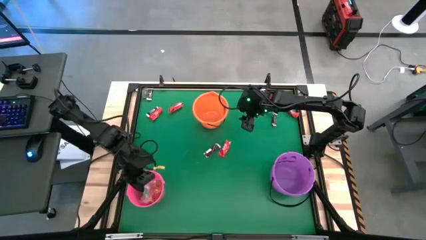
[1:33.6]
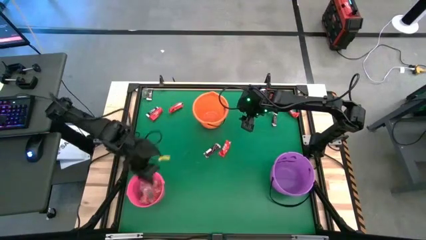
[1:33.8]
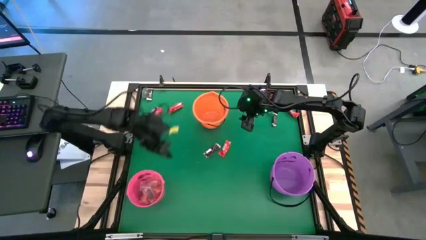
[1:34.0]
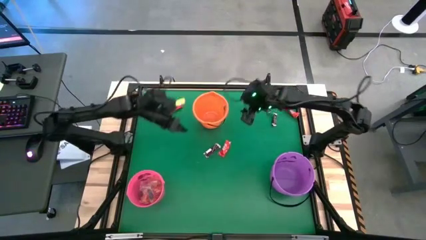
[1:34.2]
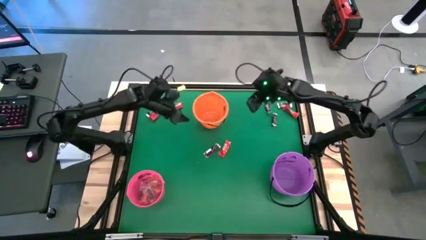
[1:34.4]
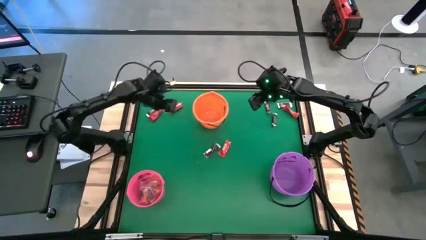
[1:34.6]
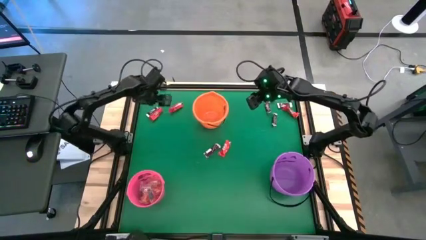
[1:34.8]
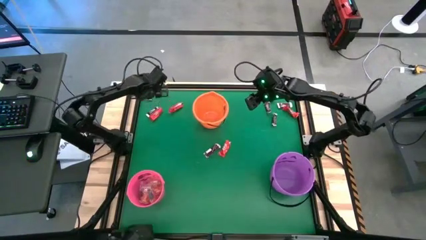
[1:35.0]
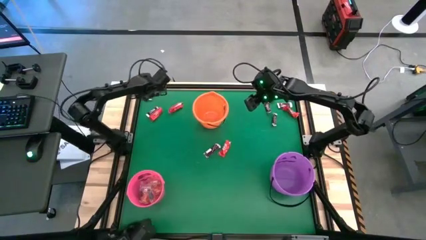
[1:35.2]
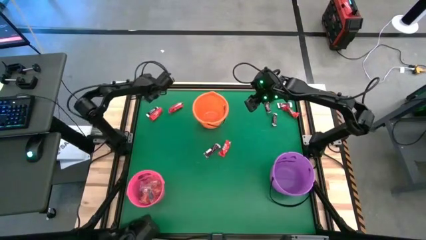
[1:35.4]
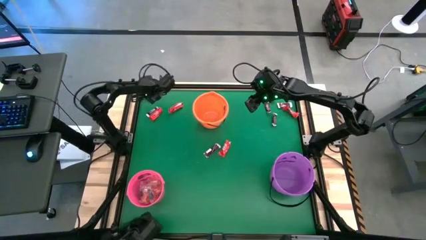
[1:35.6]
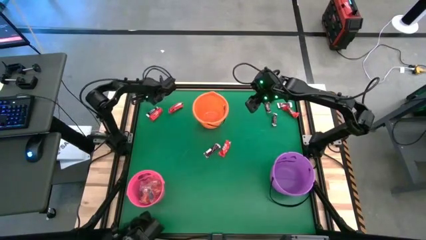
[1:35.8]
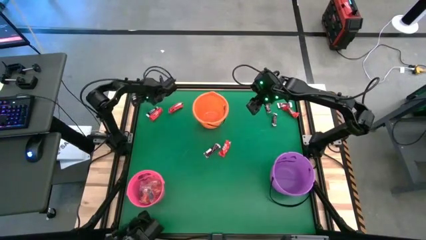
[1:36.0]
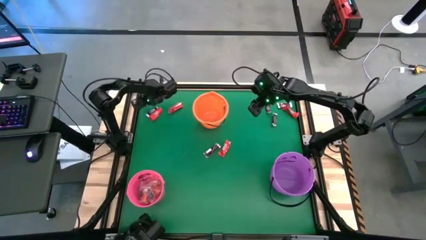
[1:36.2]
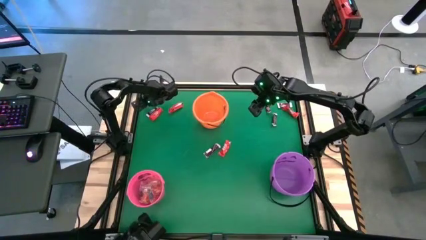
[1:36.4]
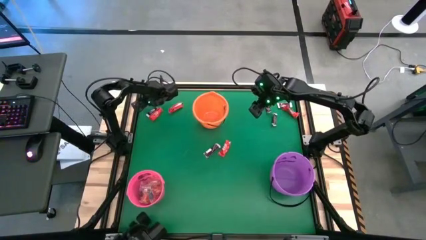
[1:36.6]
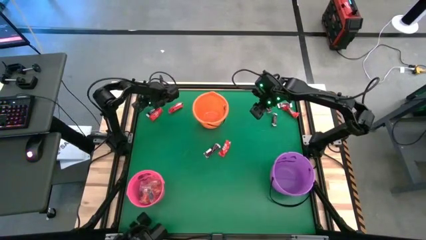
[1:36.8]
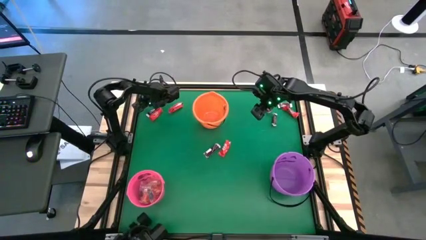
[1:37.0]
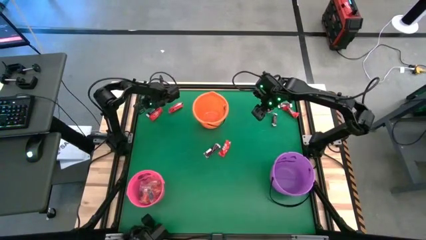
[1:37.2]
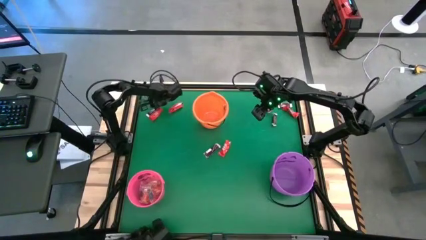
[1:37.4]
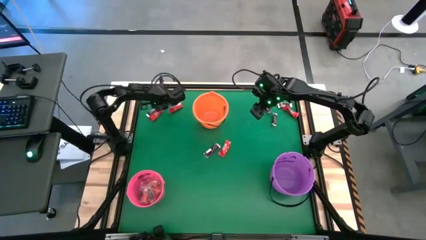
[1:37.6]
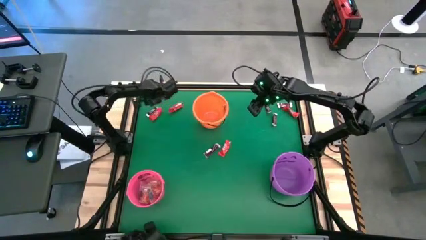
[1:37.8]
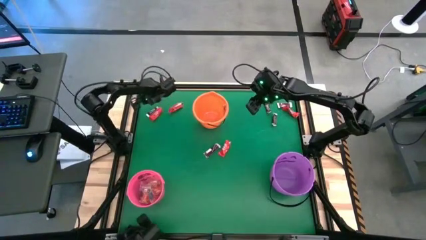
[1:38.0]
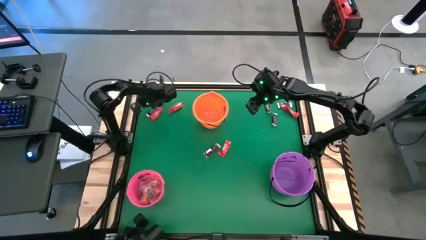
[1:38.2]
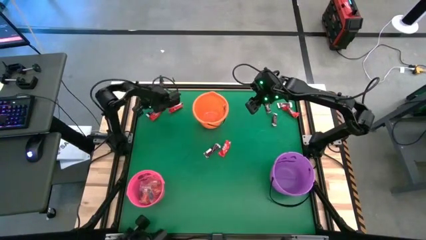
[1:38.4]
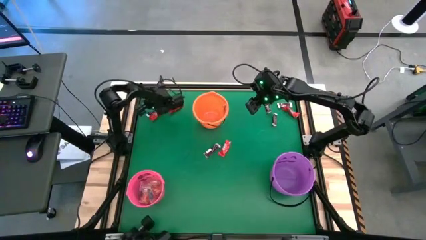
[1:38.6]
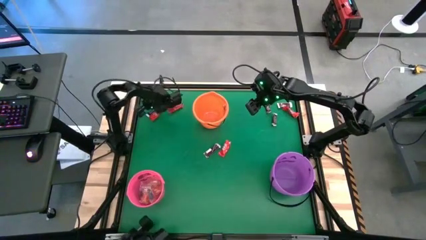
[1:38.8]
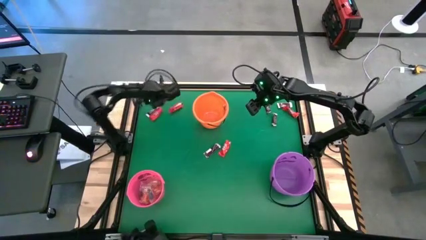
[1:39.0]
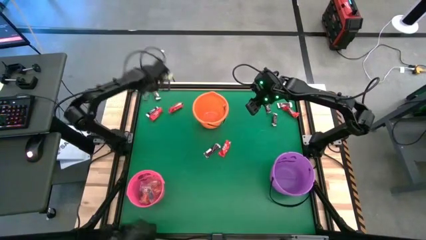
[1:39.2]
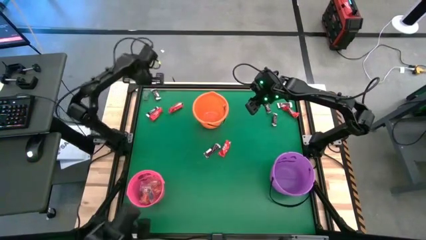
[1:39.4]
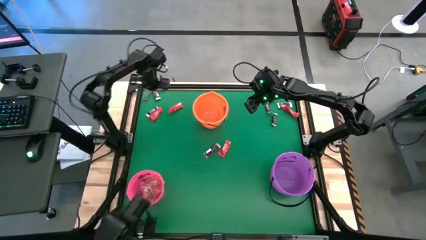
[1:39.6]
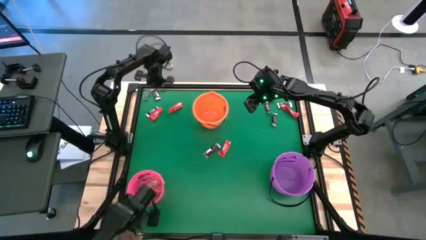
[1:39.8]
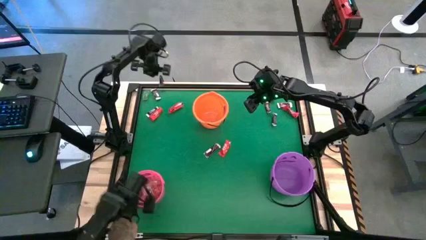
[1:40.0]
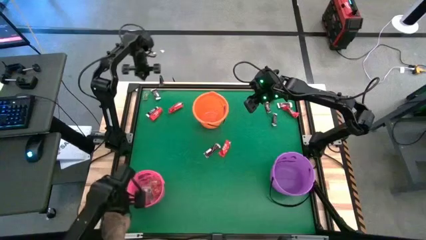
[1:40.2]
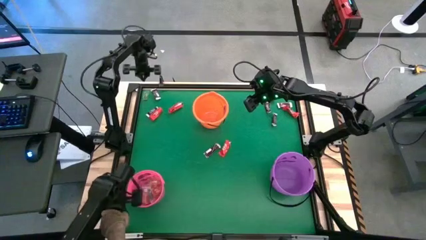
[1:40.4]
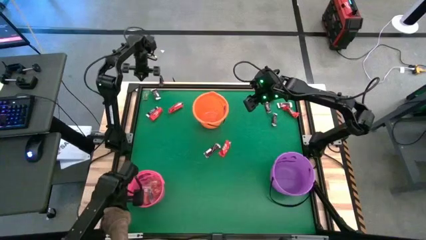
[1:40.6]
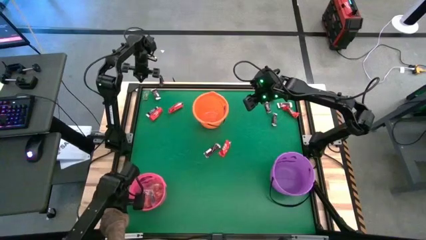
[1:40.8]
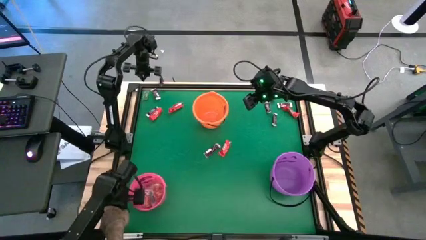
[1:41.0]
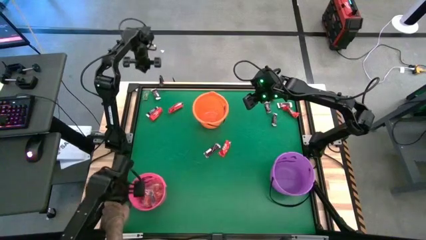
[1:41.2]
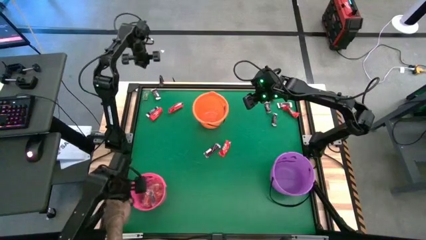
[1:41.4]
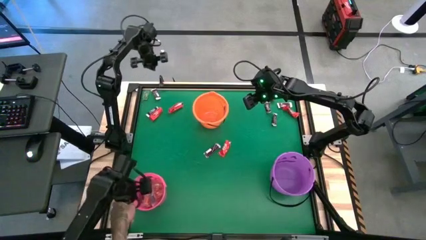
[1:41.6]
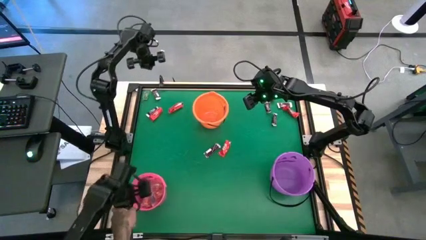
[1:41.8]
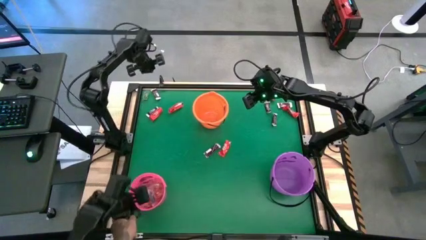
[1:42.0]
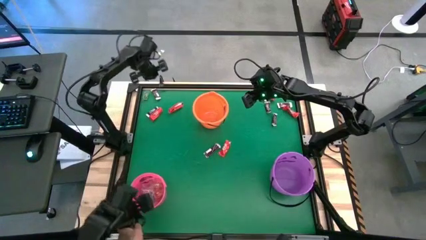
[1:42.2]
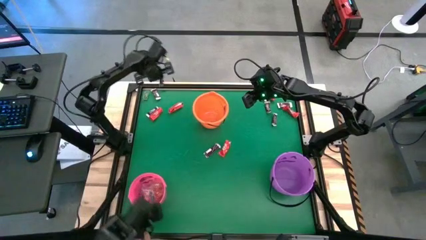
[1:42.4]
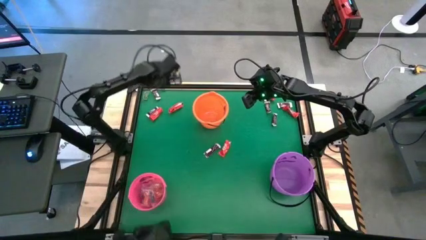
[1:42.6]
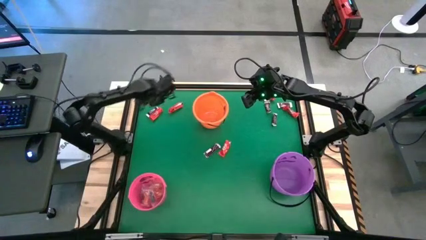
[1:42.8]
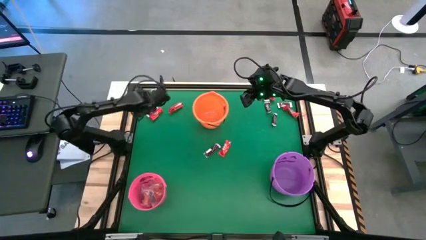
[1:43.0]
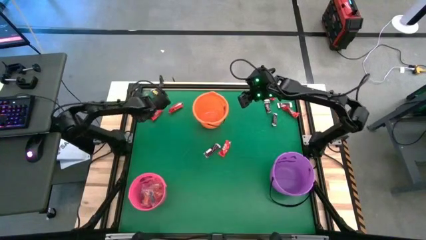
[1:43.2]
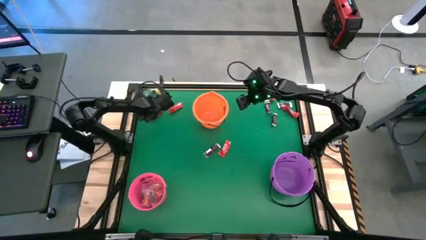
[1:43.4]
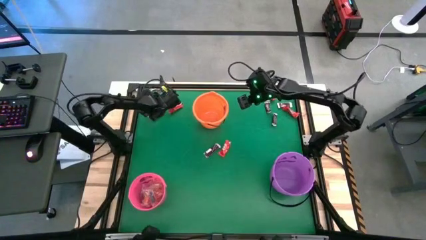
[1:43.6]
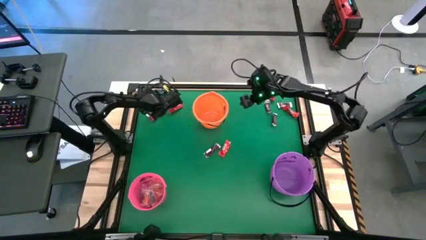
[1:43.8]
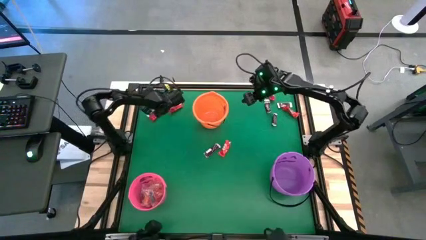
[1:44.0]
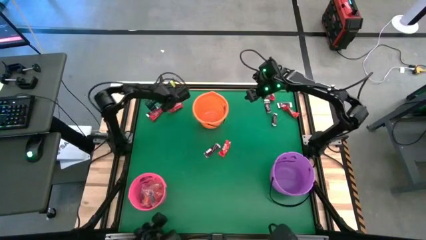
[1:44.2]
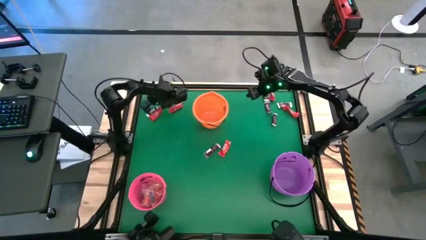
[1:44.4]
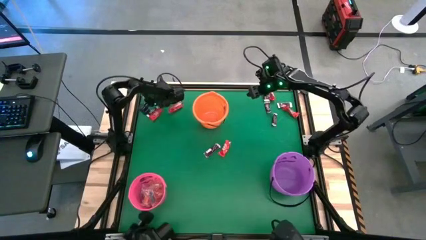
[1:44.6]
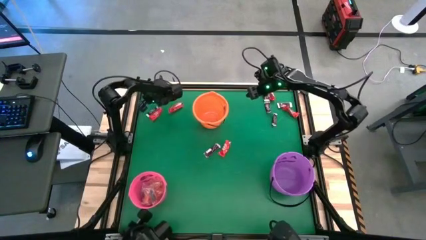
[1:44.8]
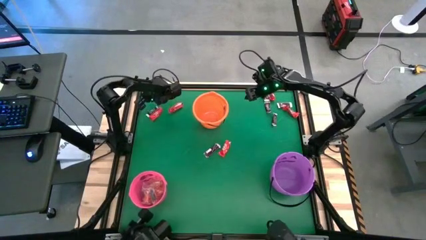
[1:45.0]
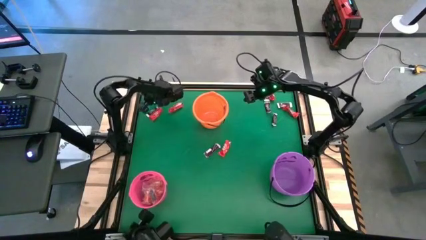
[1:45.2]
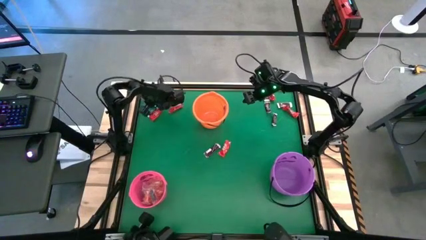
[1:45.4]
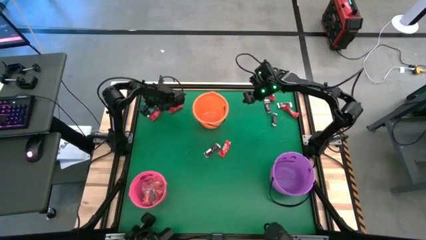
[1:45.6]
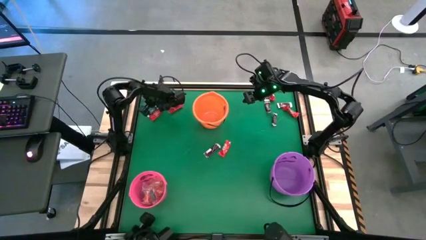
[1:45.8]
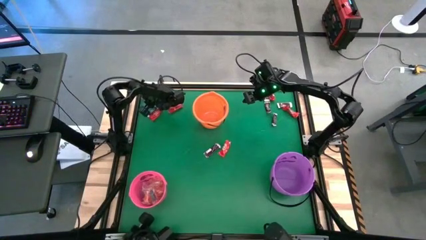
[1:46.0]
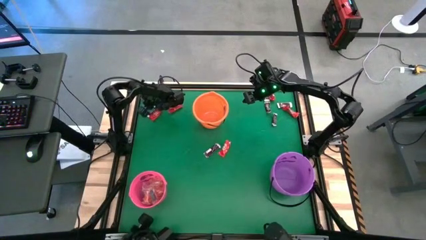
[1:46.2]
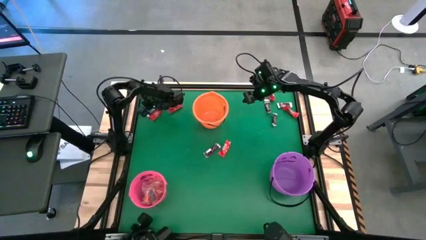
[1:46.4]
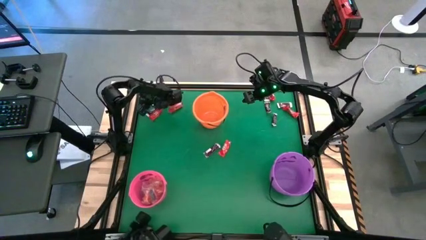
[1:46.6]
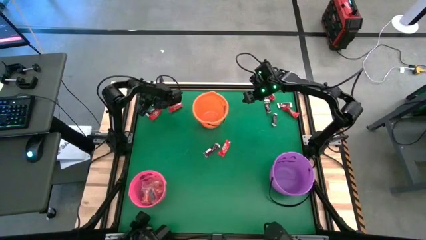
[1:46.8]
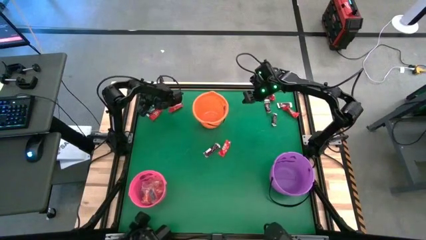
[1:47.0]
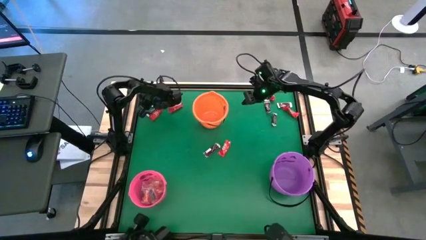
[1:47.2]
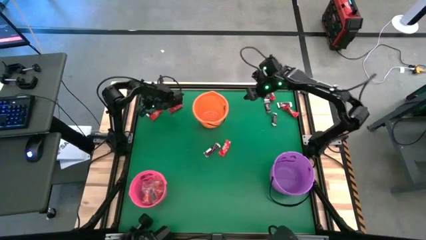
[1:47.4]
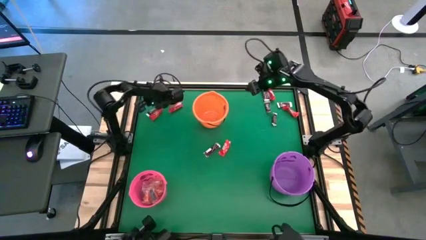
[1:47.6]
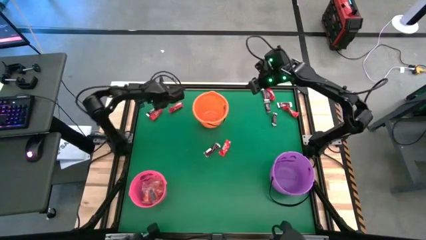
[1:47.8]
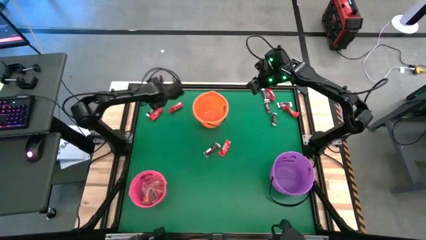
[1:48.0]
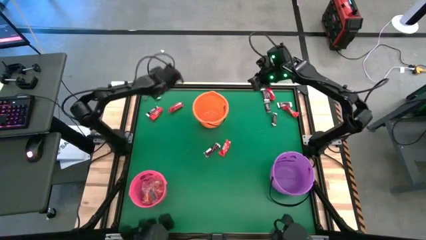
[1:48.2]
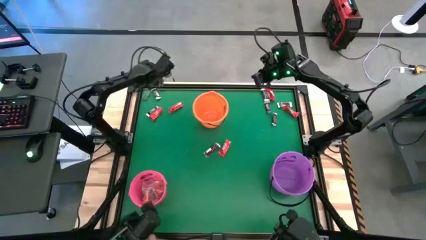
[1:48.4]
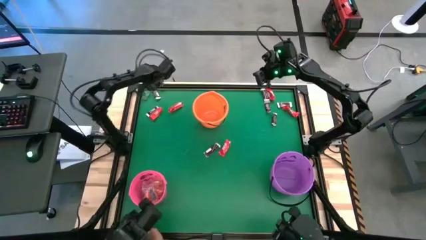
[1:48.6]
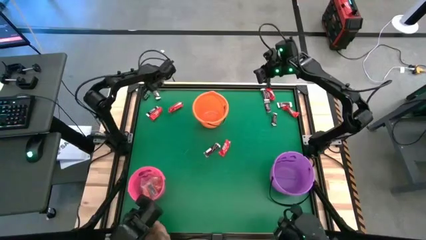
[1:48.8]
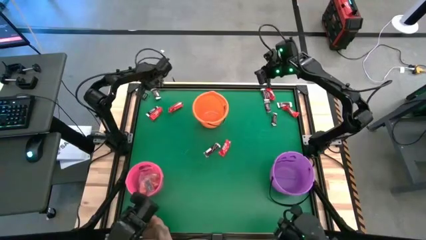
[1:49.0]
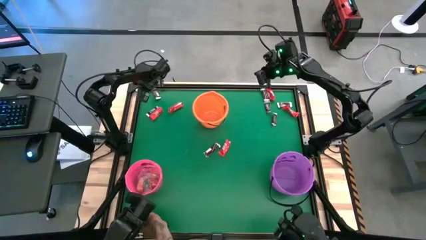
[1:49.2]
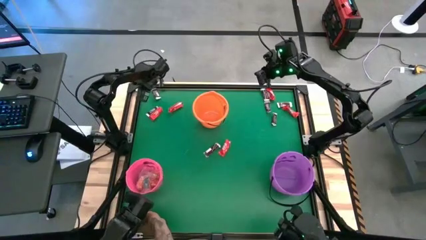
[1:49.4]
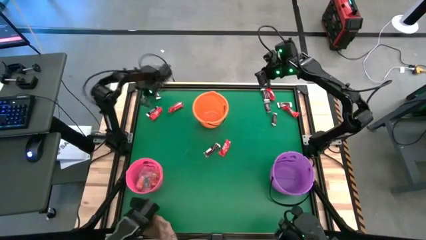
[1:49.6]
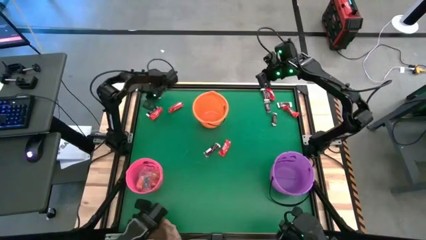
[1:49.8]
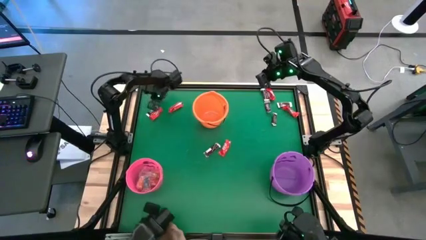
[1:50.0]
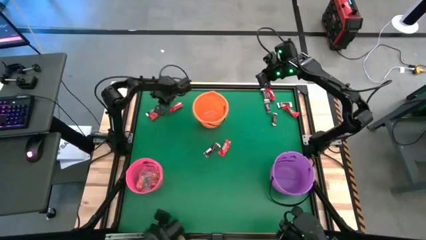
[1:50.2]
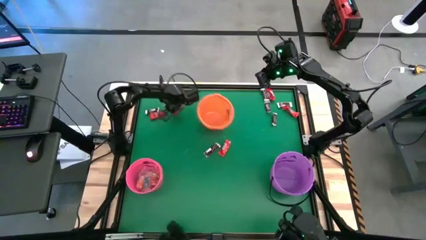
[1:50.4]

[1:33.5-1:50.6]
Task: Sort candy by brand, put in halloween buckets
Put the green gummy into the pink bucket
